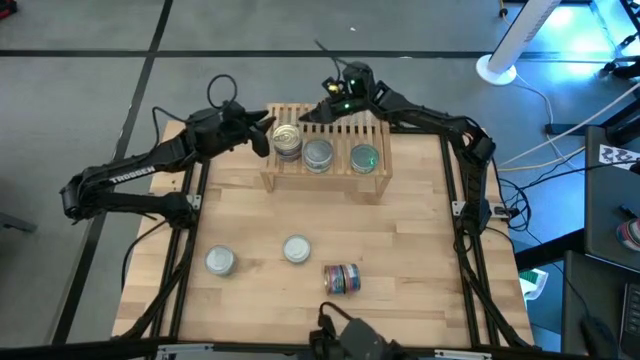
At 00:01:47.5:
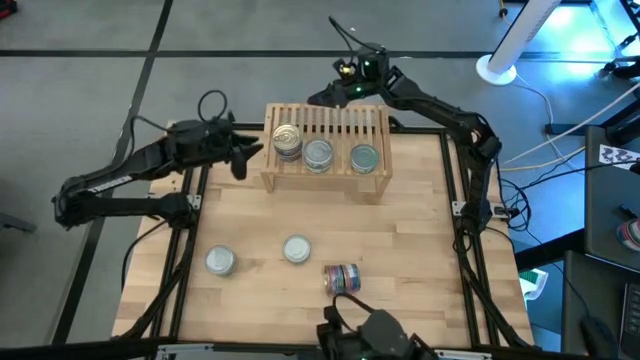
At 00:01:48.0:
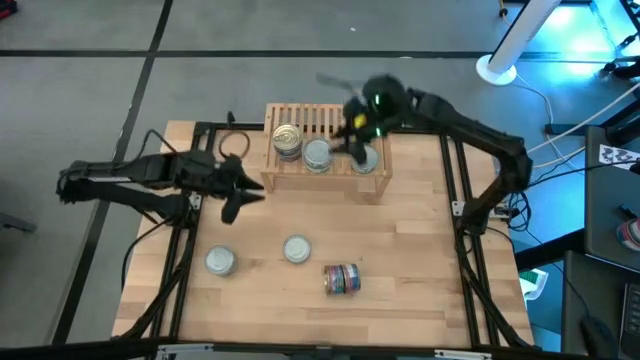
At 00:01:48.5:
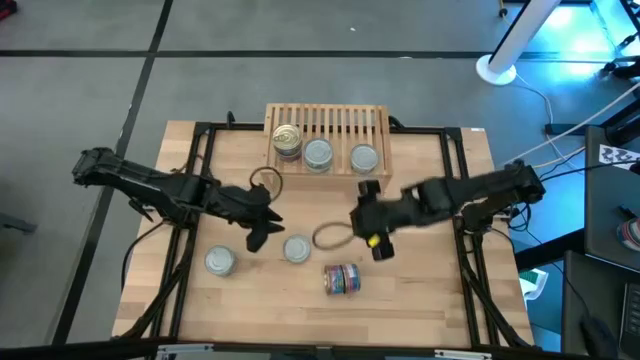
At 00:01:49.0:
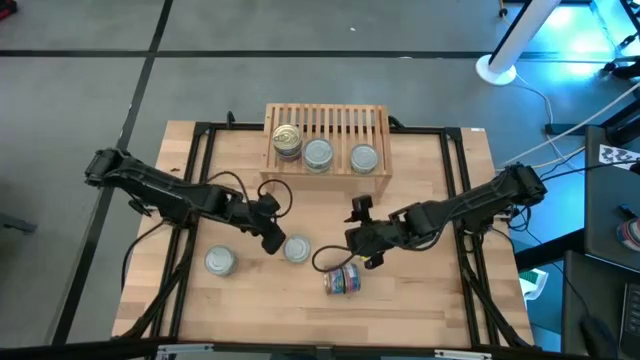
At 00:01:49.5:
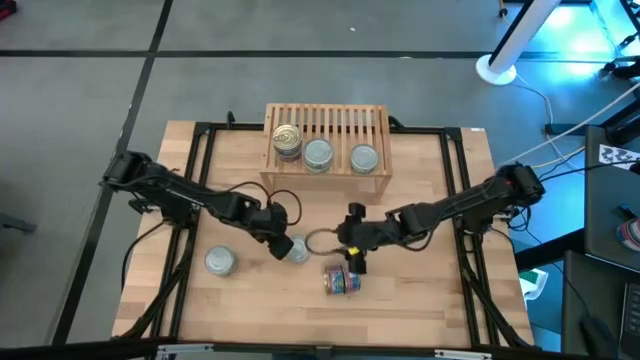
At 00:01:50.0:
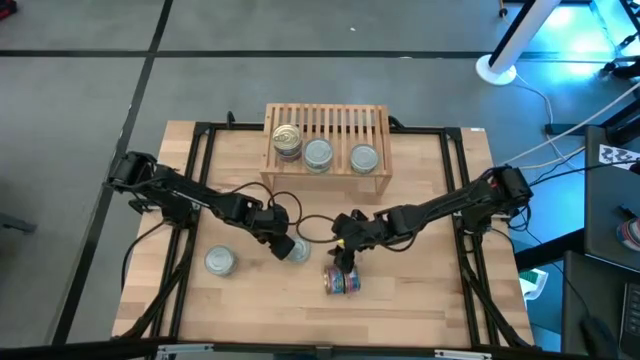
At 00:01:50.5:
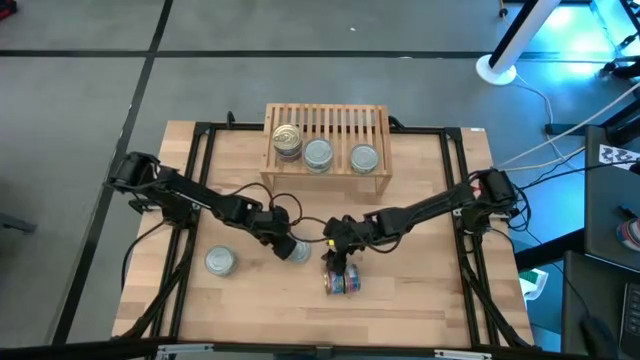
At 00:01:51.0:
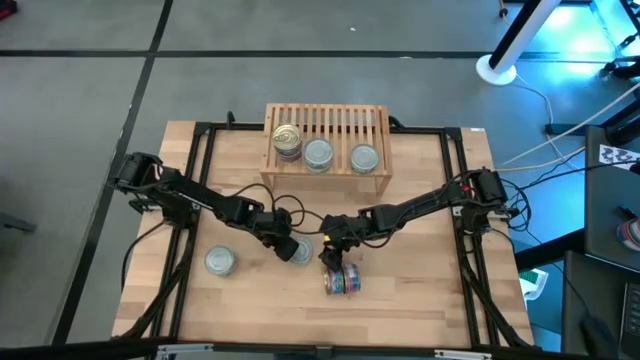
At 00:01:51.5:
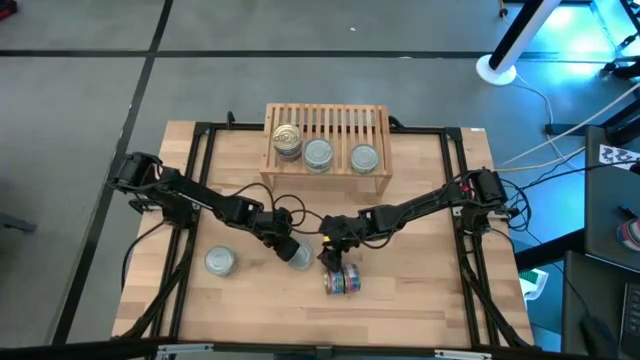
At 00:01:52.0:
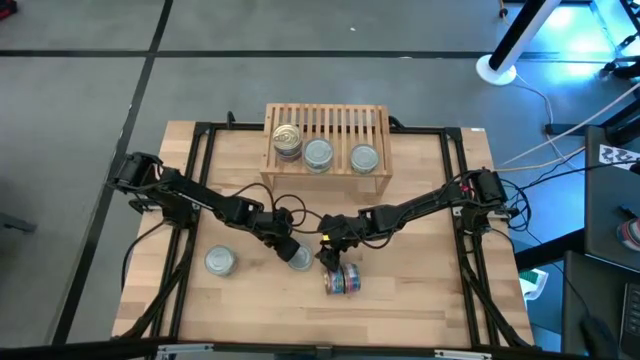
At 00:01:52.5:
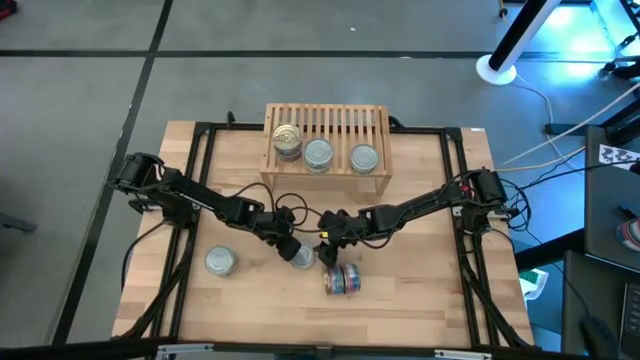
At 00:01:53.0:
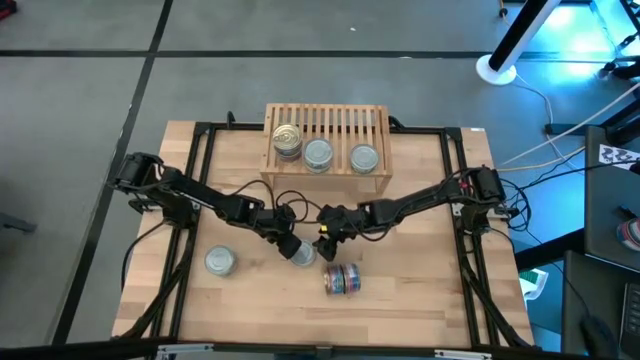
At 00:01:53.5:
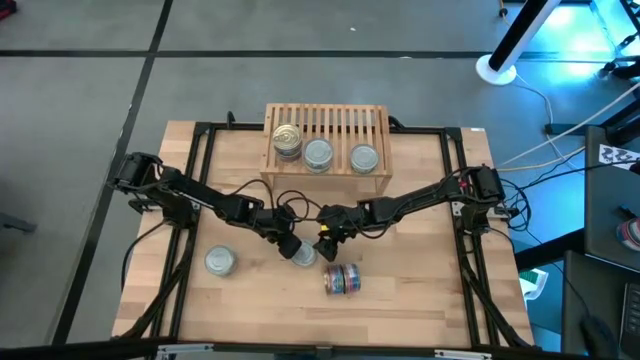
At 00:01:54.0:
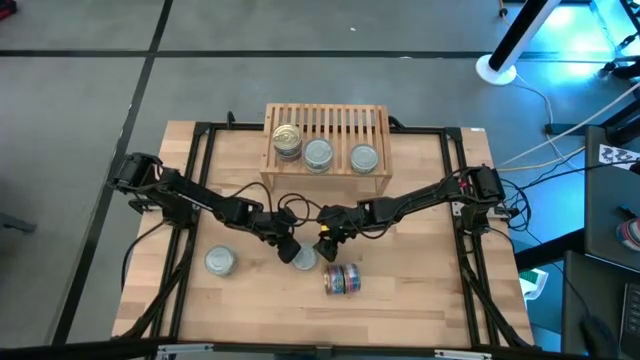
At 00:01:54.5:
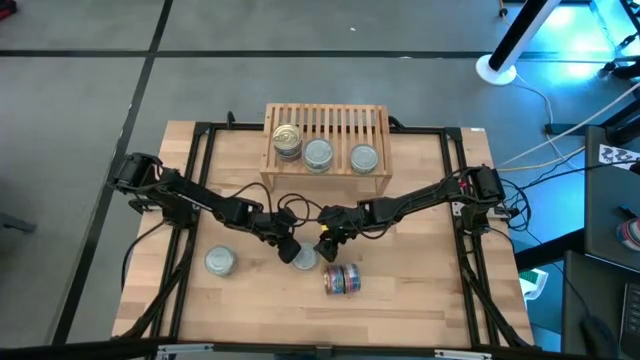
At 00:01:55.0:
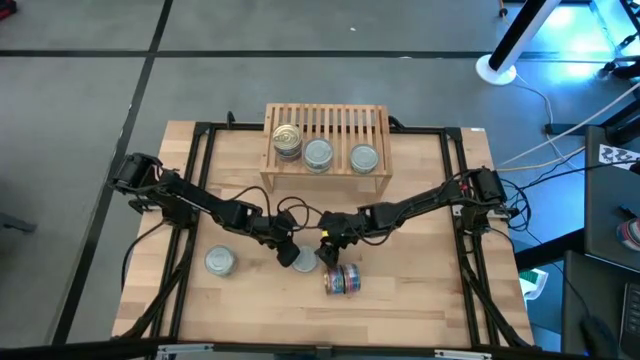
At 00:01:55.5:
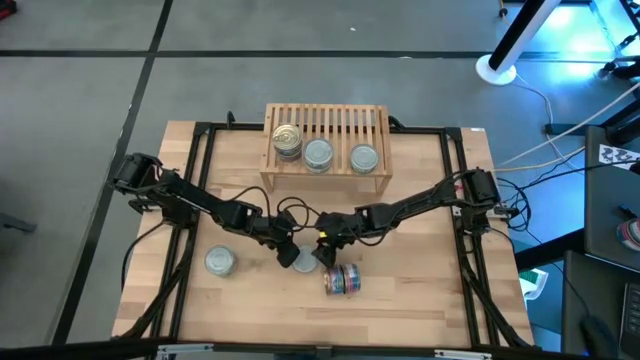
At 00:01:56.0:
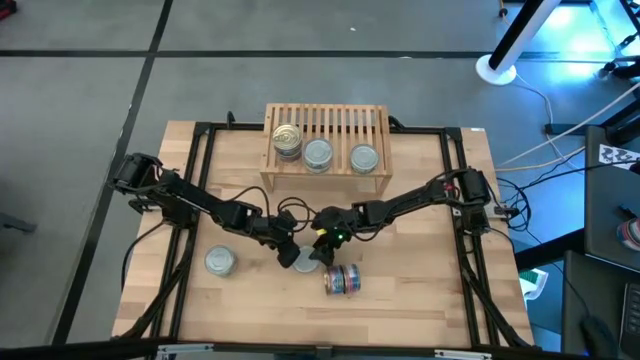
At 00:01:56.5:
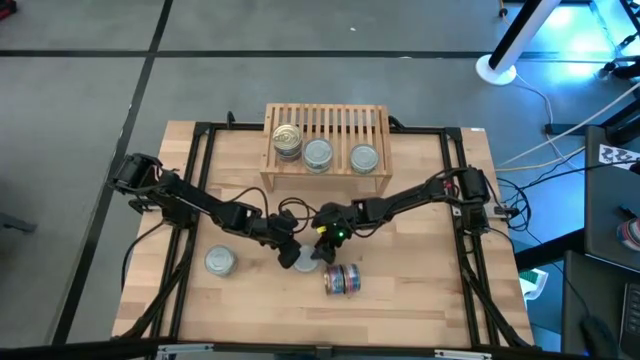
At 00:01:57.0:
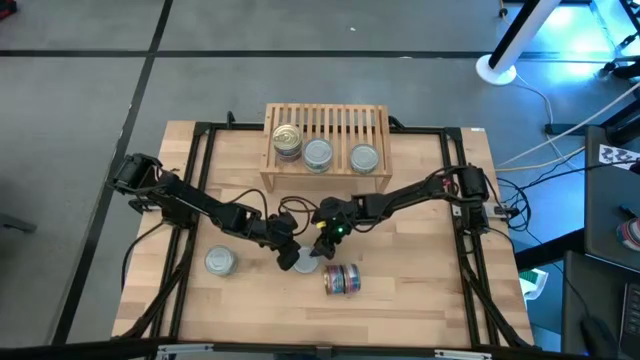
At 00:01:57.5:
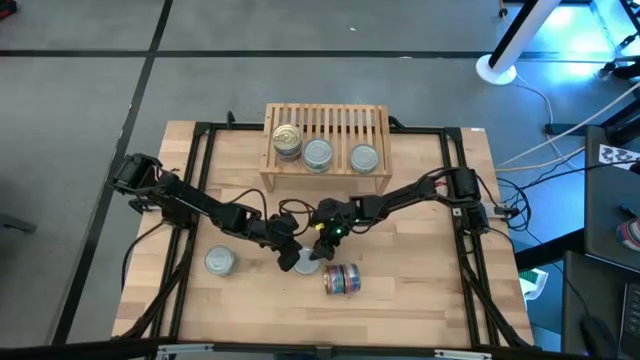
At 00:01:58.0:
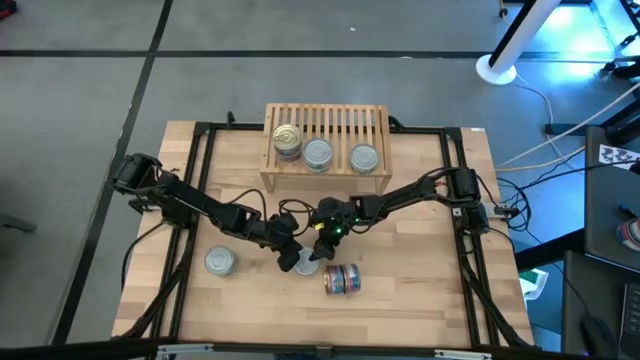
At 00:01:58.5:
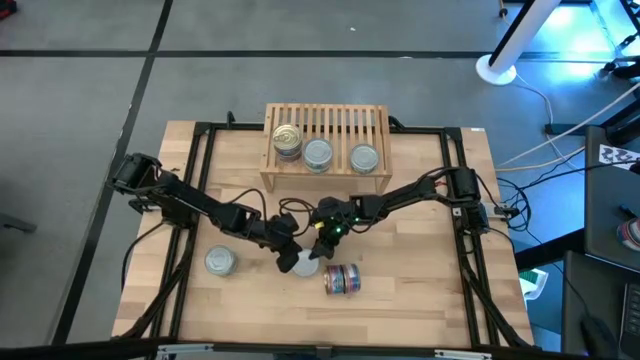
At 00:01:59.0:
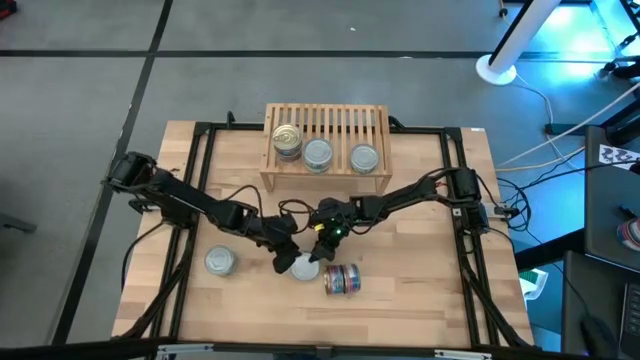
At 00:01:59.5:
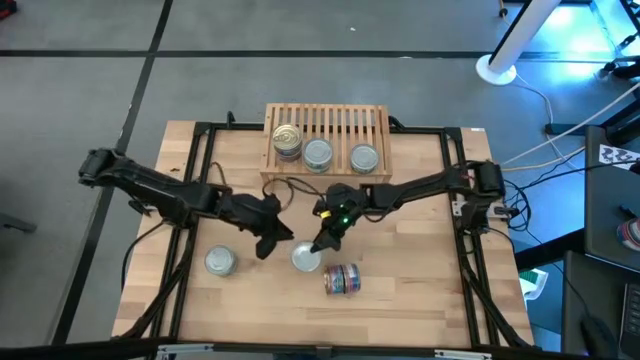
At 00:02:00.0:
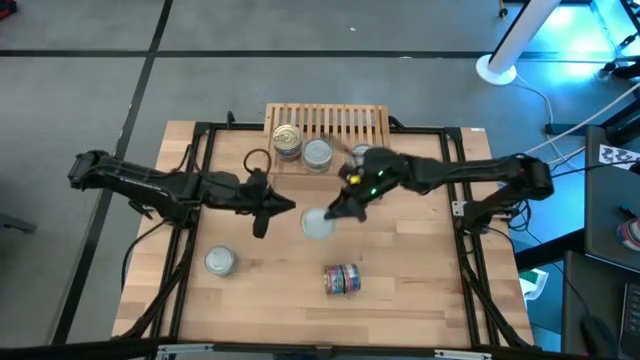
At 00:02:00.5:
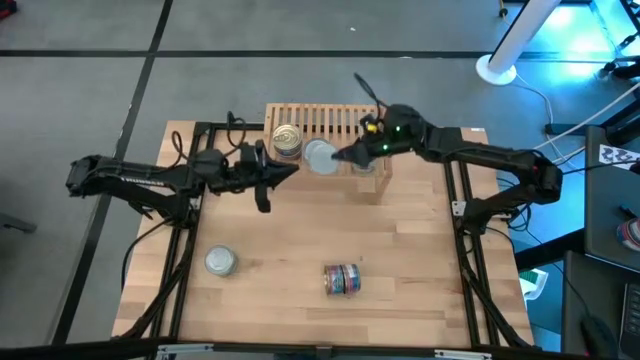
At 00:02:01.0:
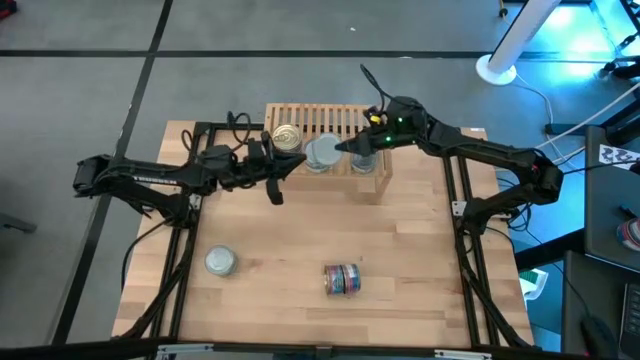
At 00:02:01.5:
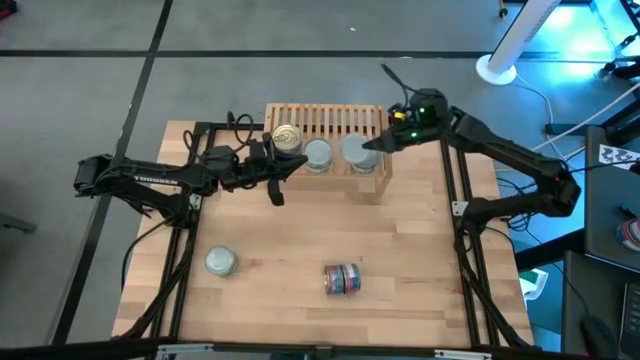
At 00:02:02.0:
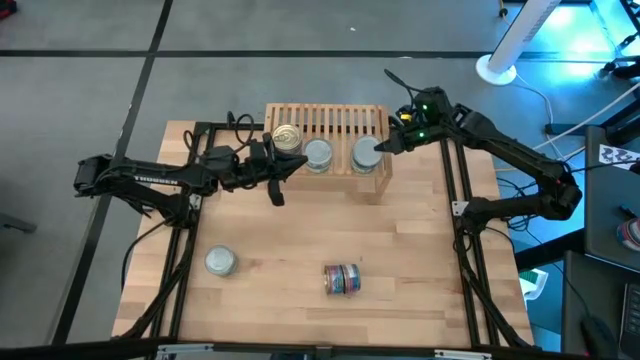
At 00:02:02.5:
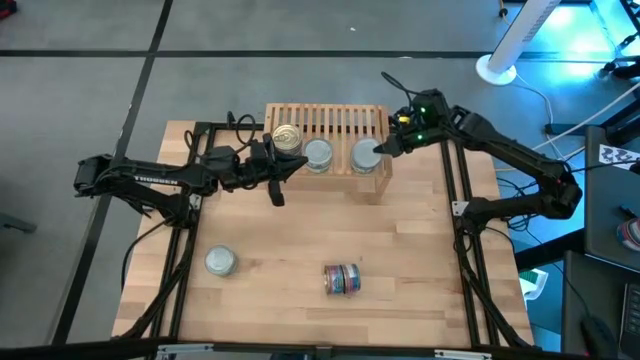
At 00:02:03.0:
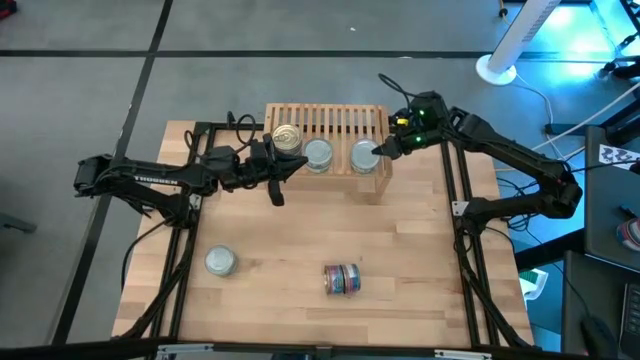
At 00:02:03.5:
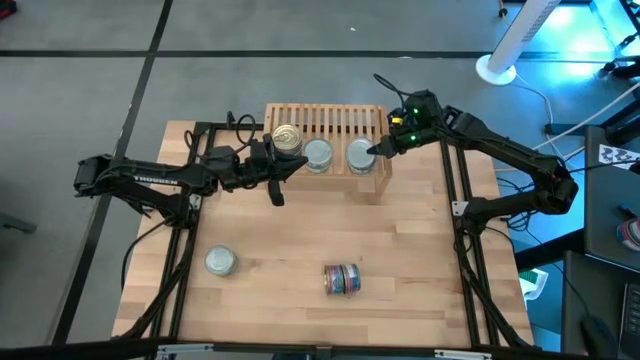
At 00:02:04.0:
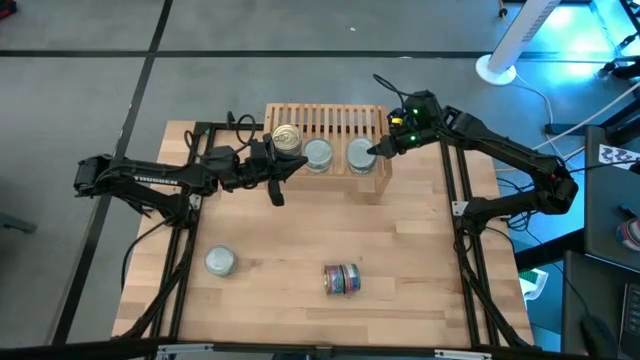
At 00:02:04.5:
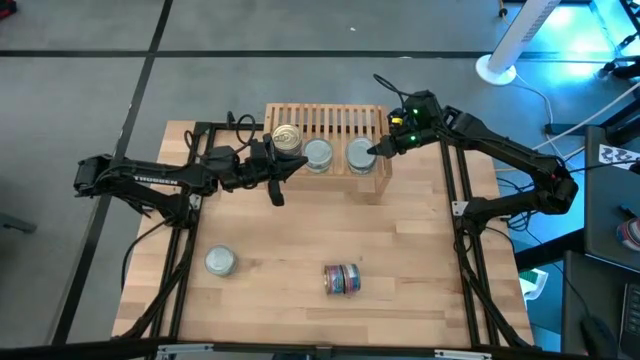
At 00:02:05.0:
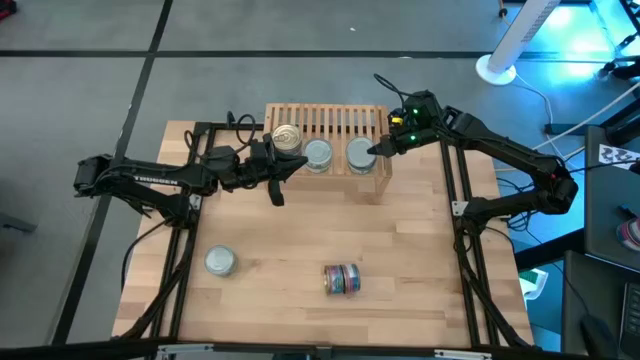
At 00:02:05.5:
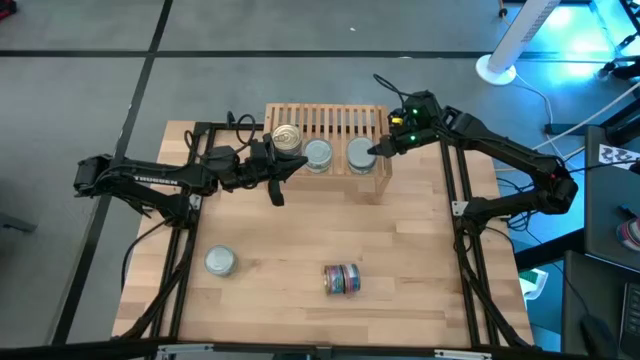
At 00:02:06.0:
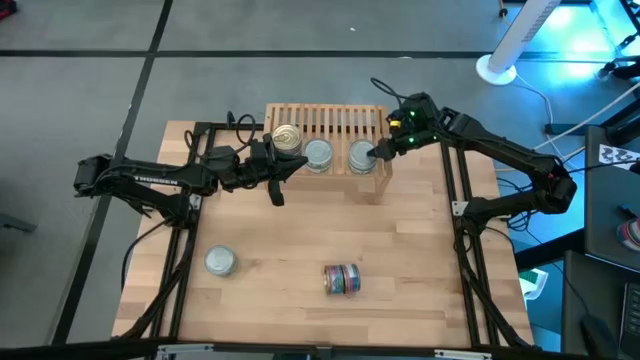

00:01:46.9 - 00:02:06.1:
Task: Stack canned seafood by type on shelf
Stack the green tuna can on top of the other green tuna can on the shelf
